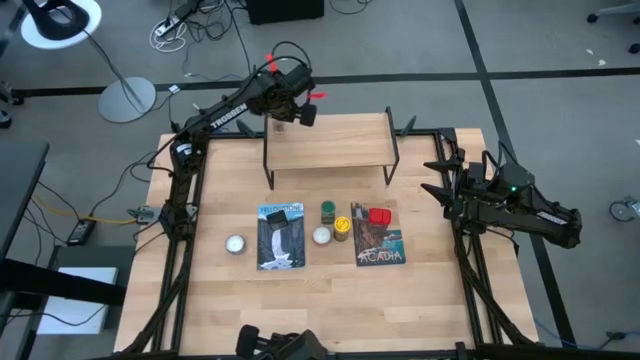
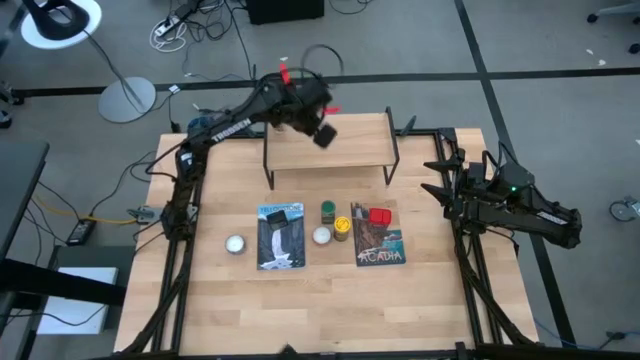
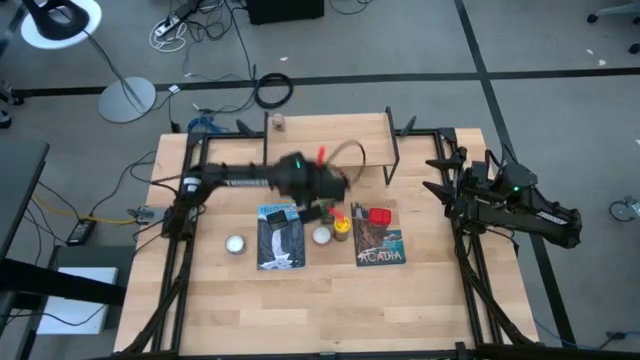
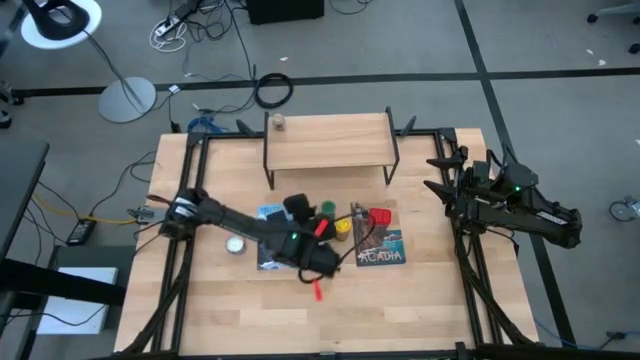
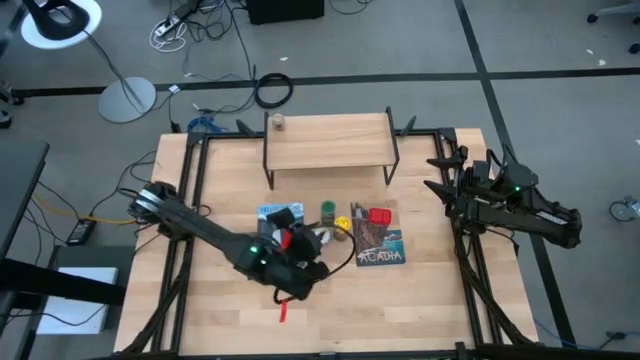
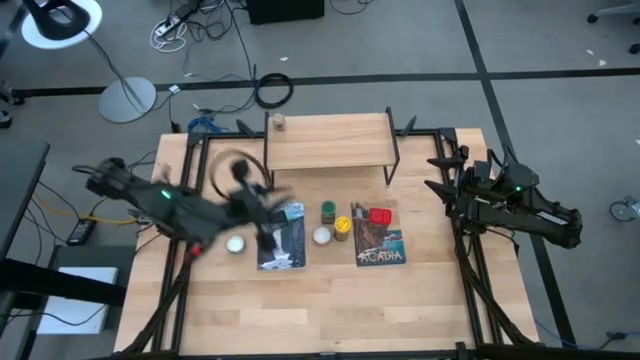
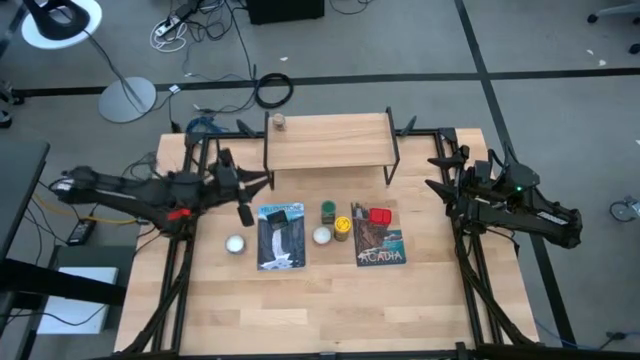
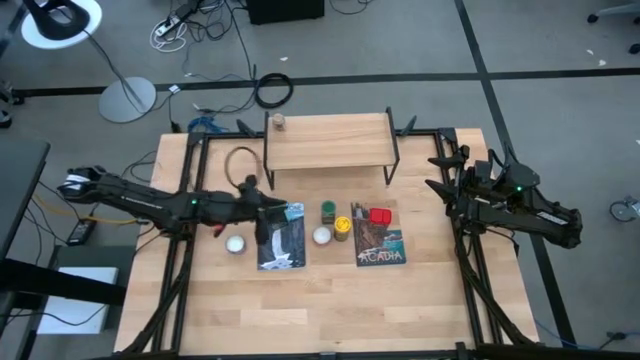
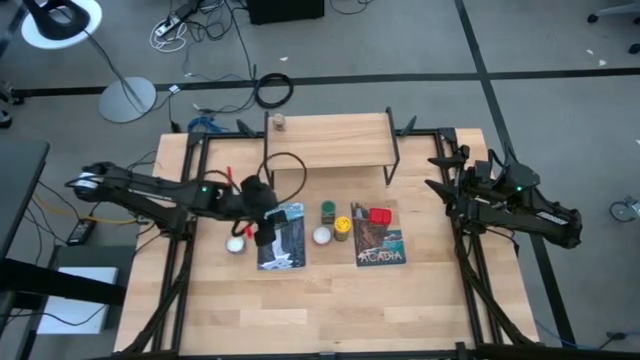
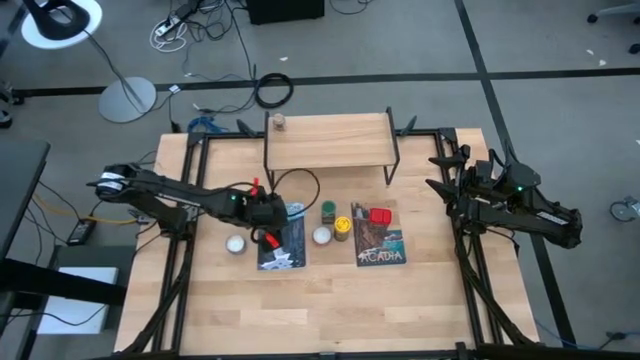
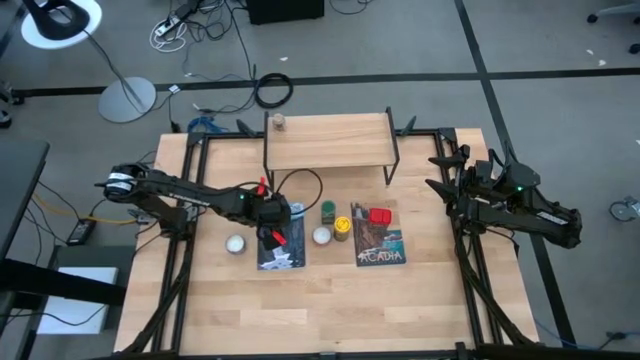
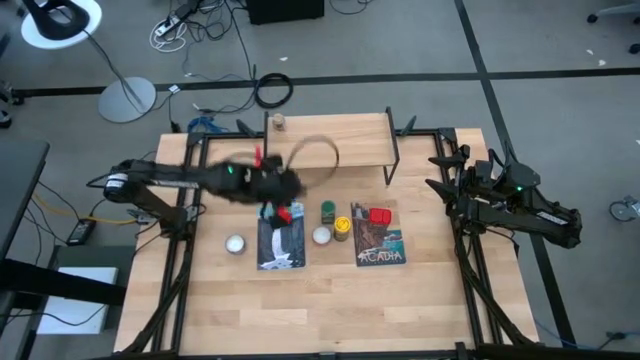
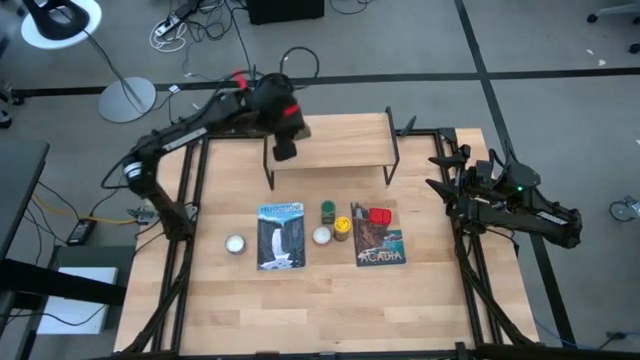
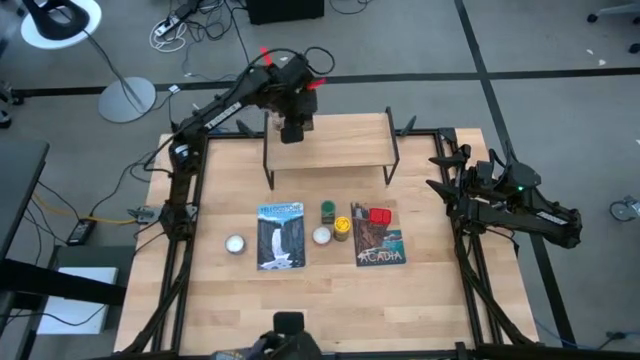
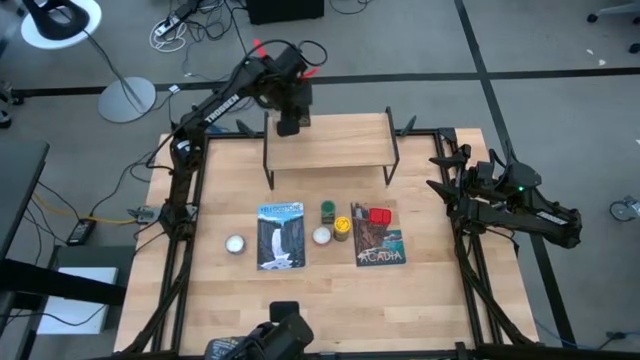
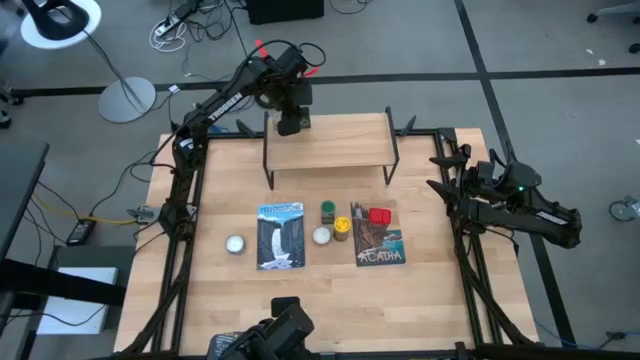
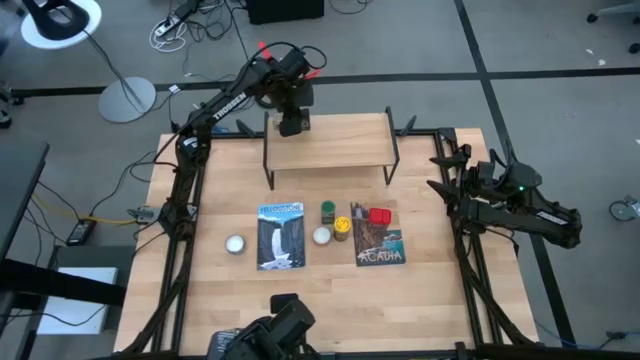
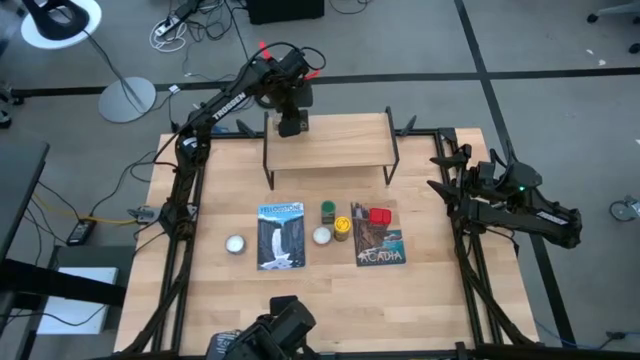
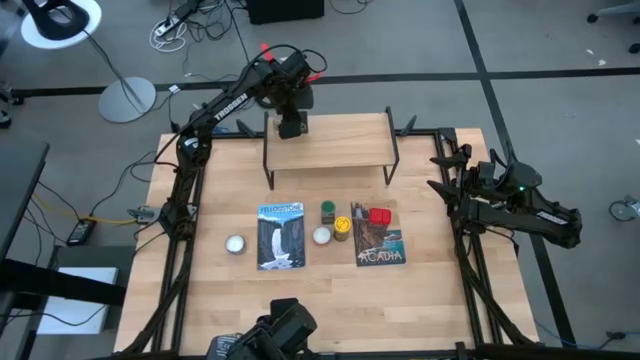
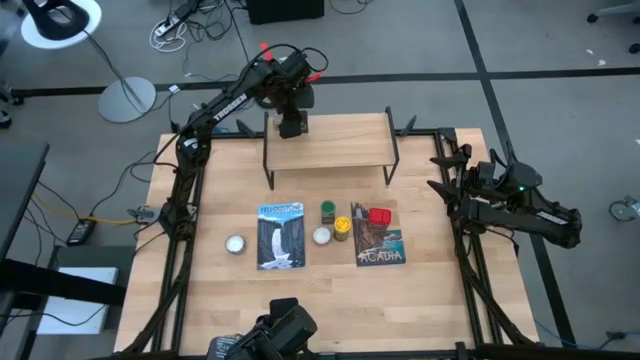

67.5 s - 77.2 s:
Task: Shelf spices
Put the black spice on the shelf

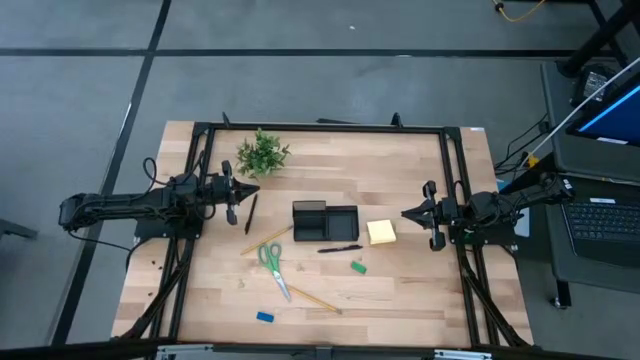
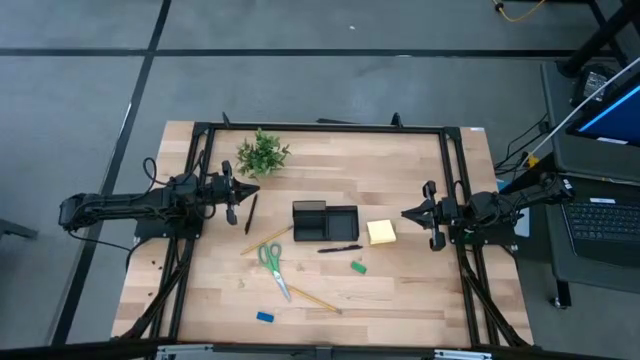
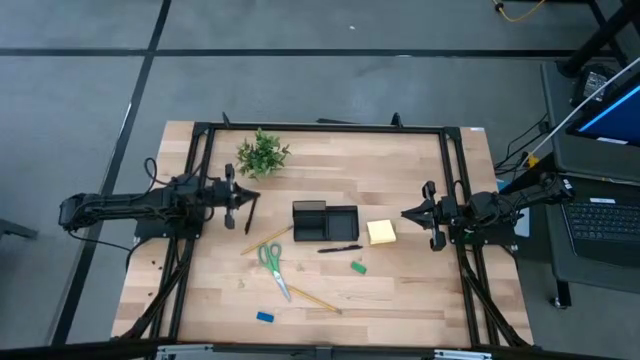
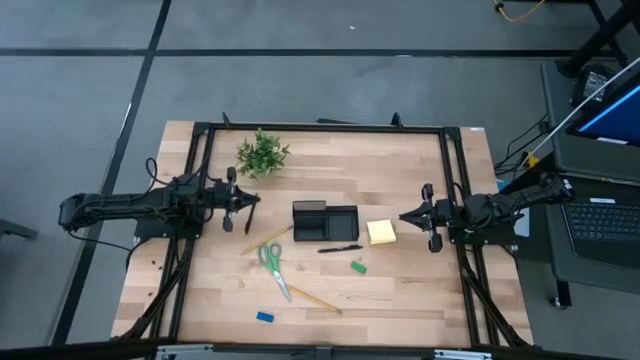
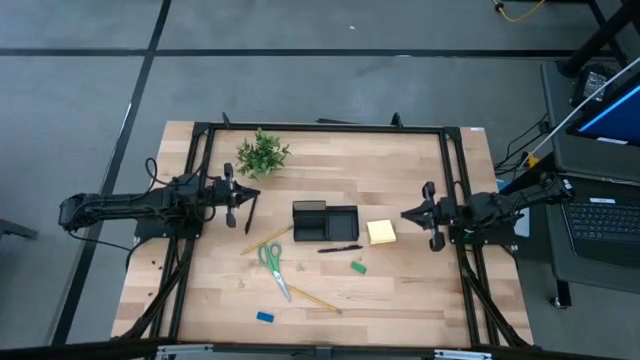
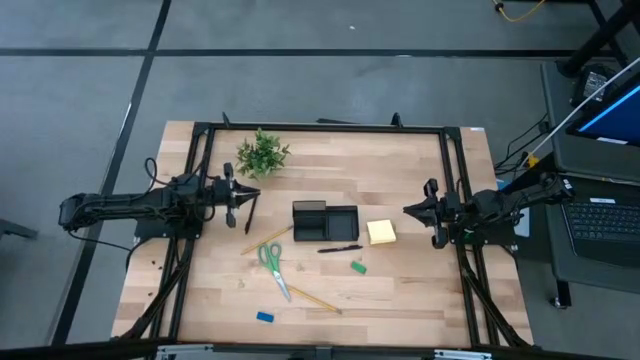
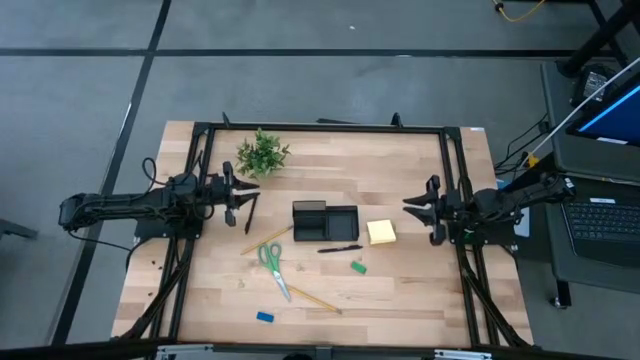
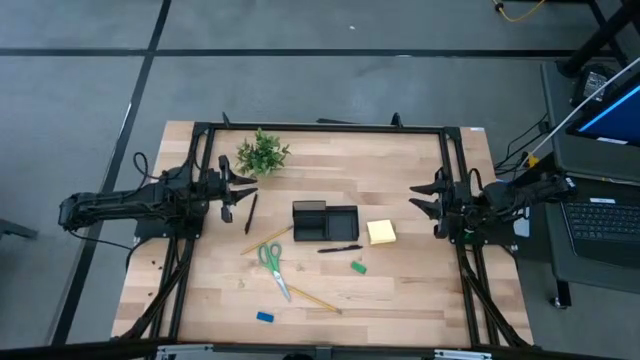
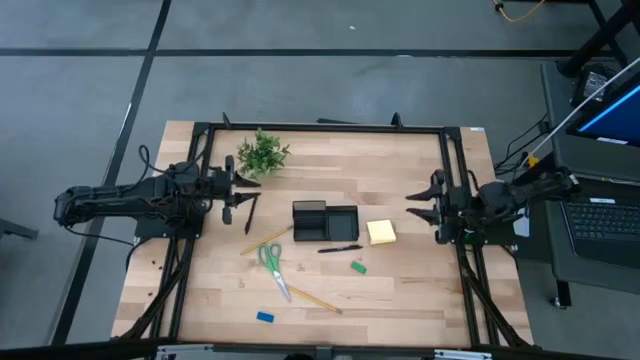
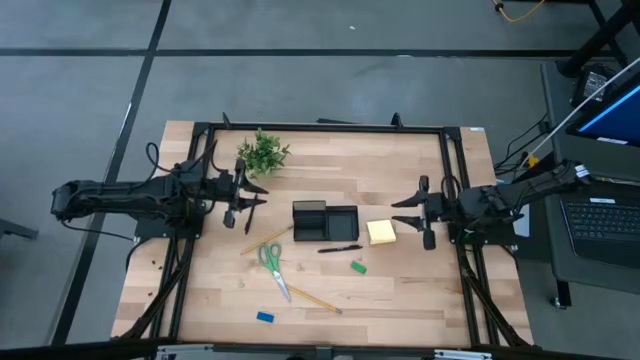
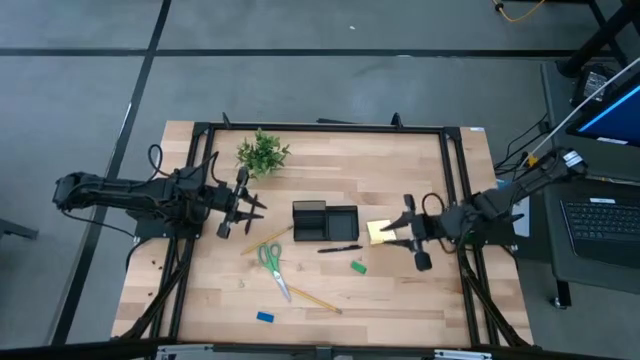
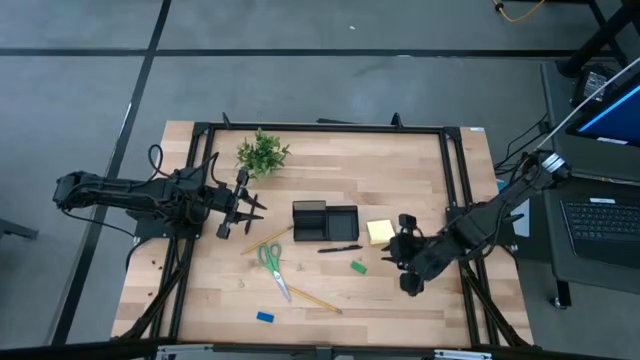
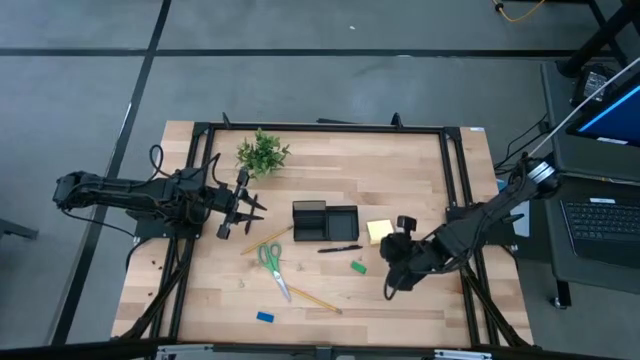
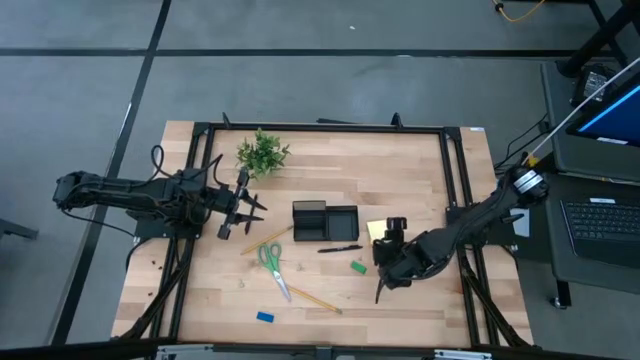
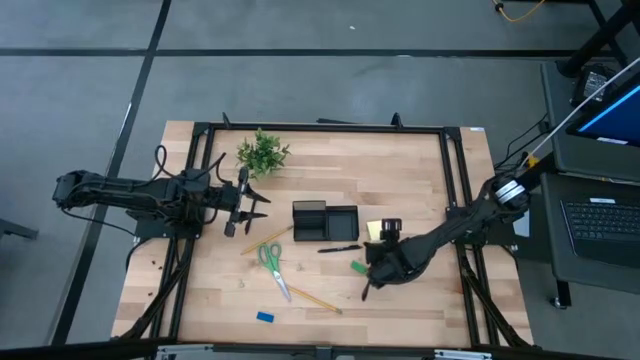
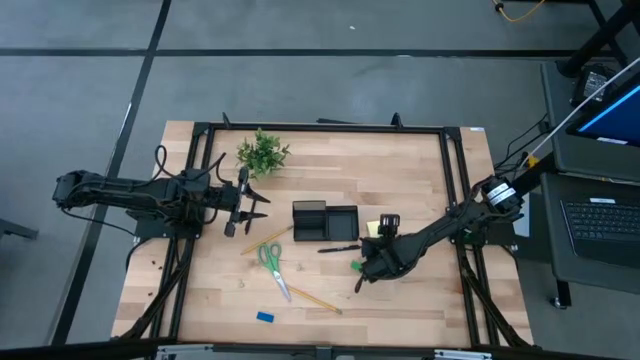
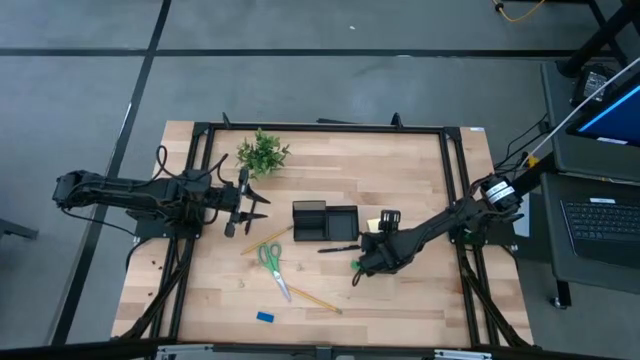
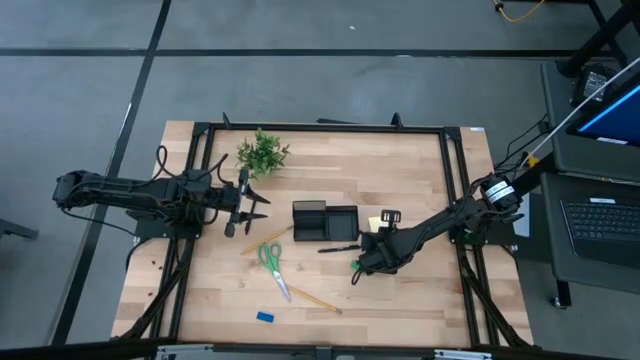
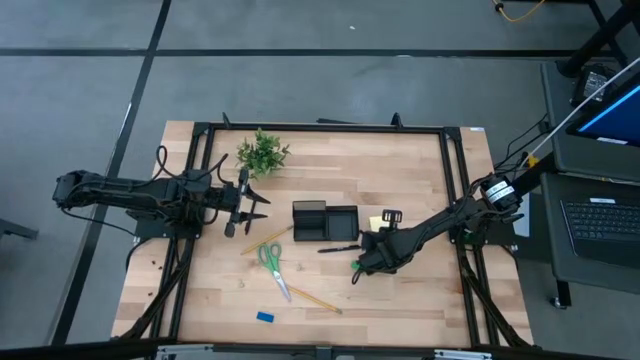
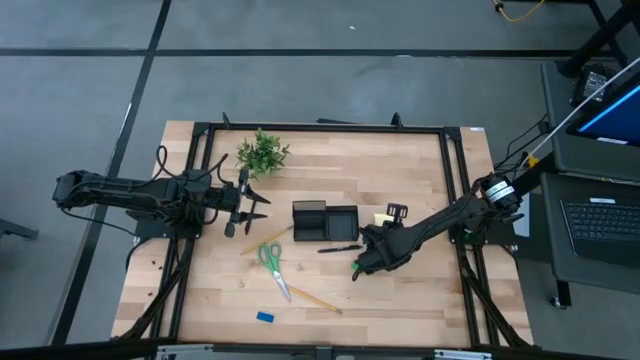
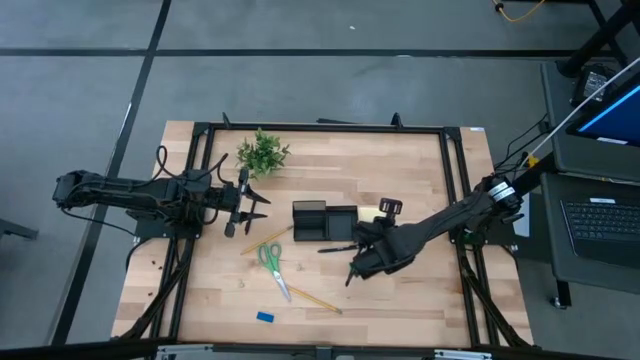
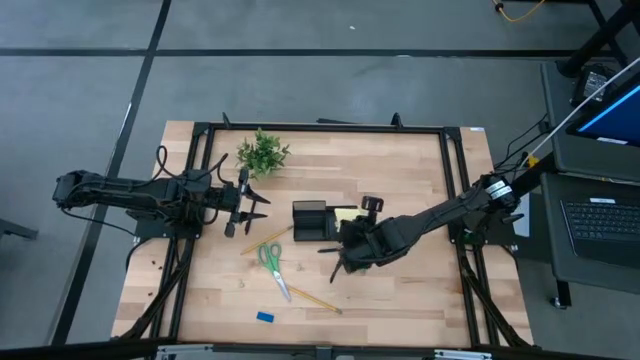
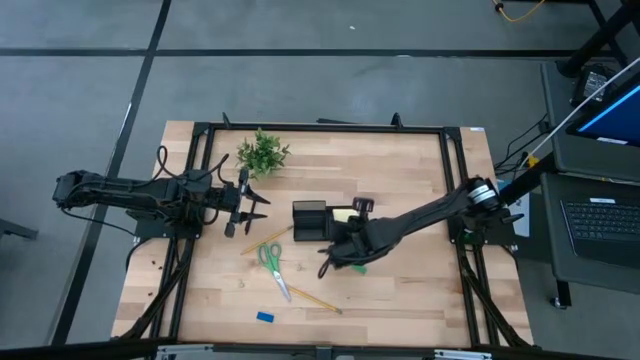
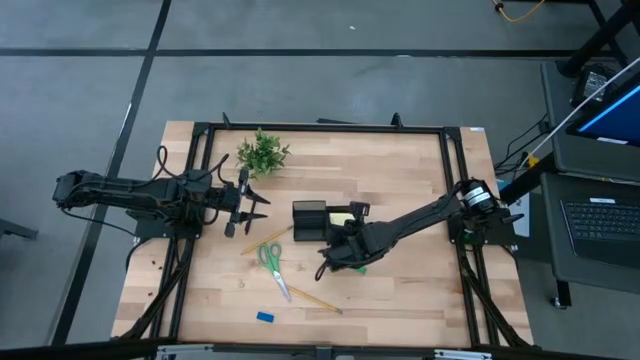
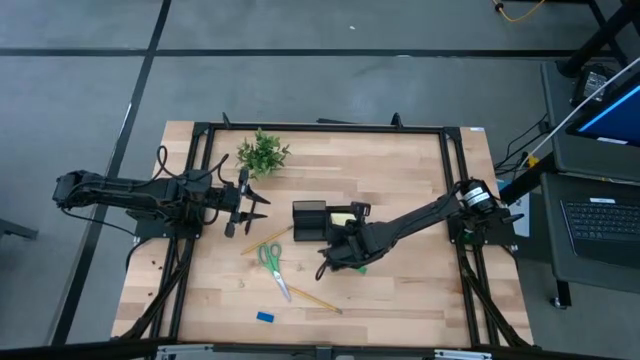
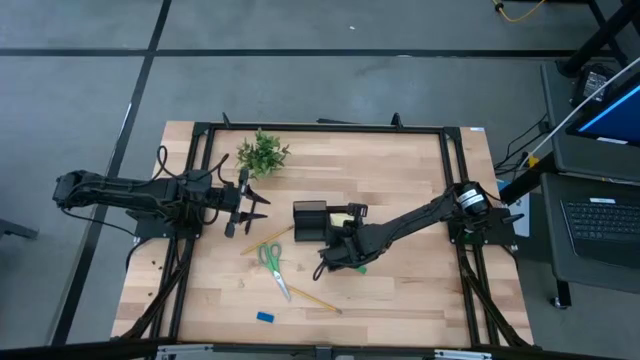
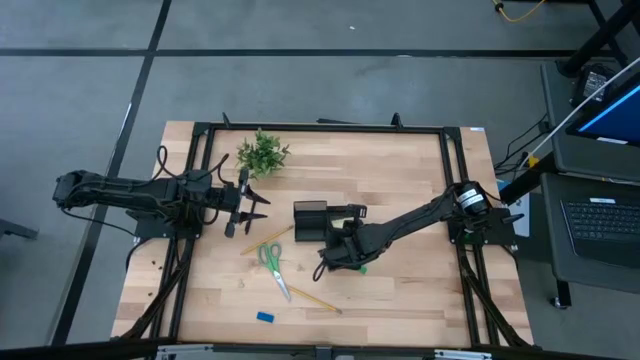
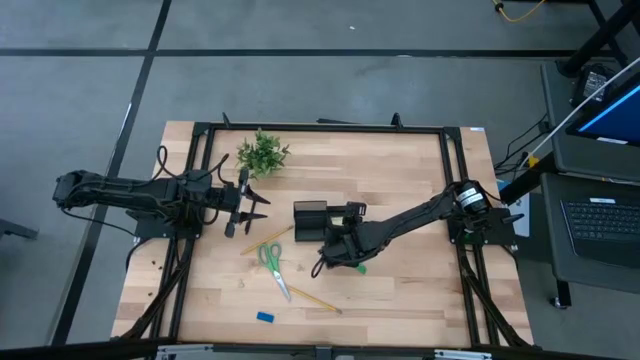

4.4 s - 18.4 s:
Task: Pick and place office supplies into organizer
Put the yellow sticky note into the black desk organizer
